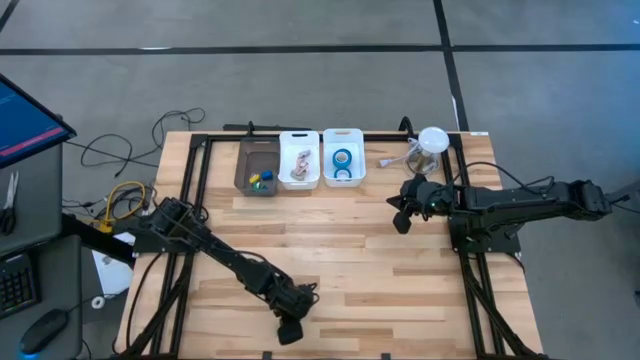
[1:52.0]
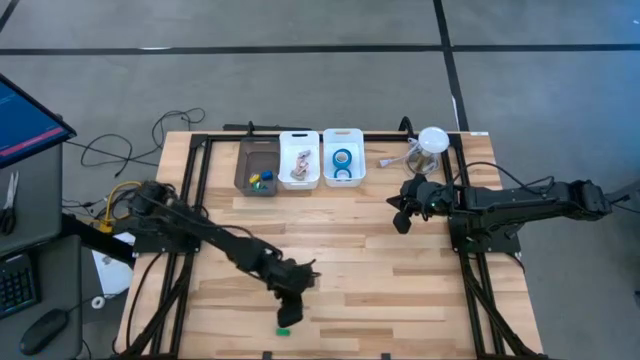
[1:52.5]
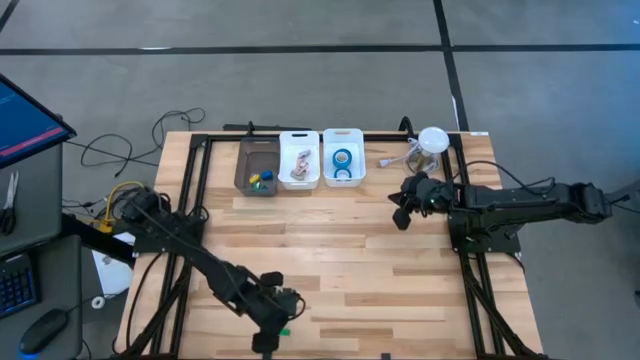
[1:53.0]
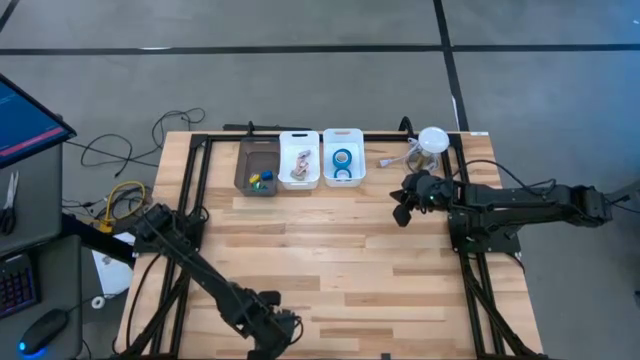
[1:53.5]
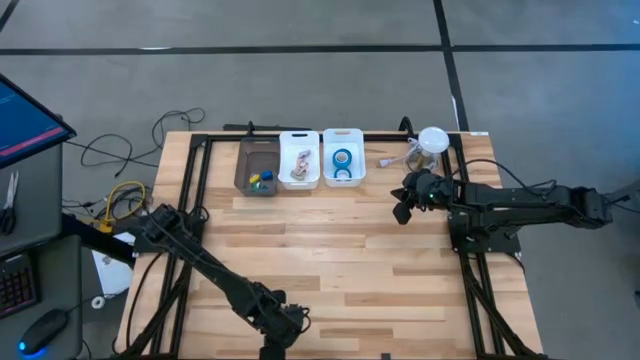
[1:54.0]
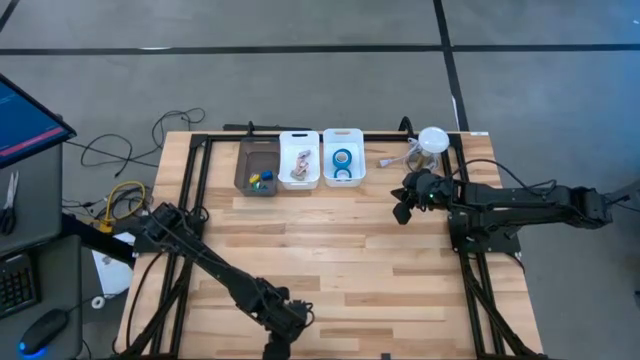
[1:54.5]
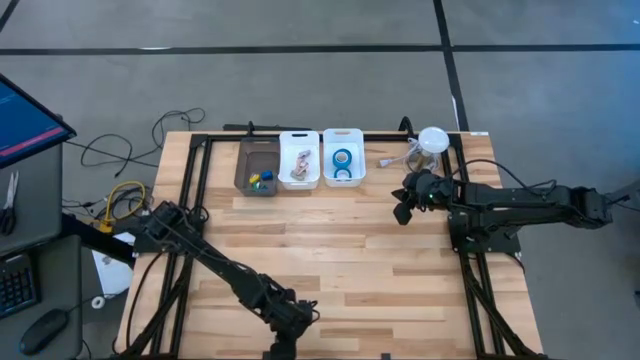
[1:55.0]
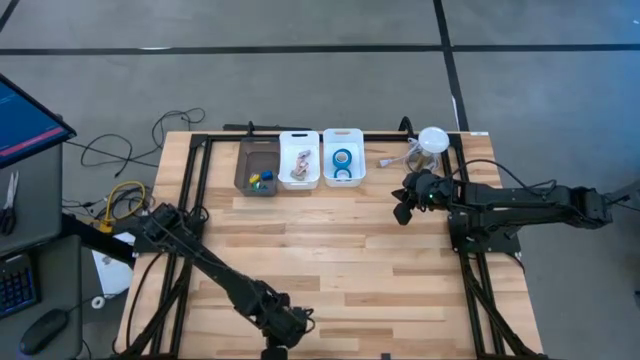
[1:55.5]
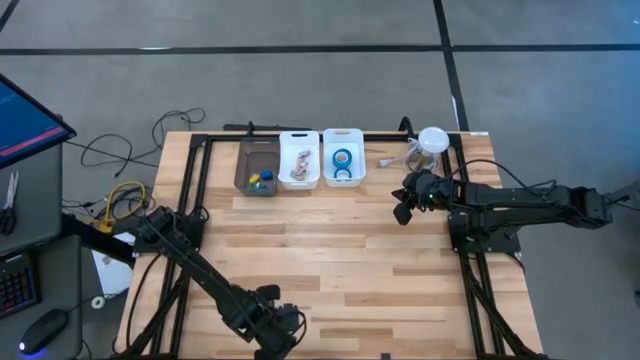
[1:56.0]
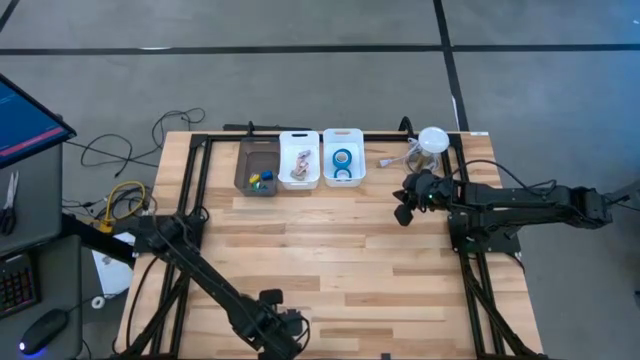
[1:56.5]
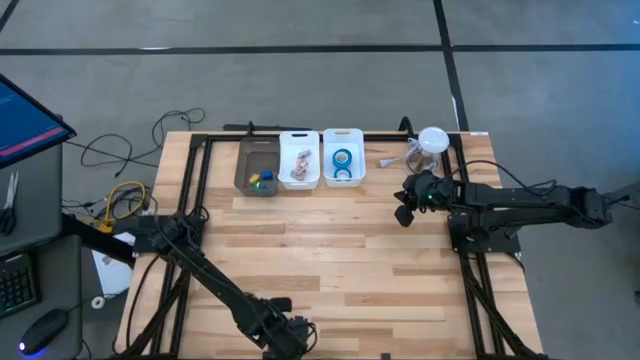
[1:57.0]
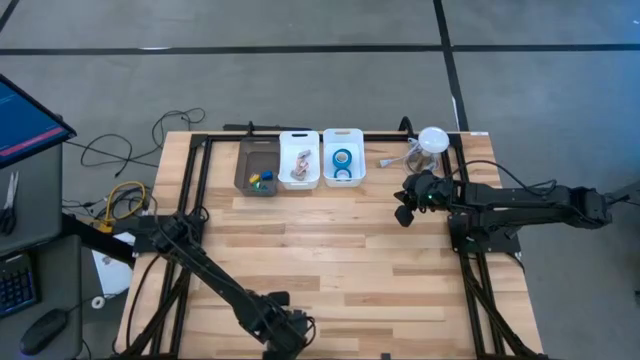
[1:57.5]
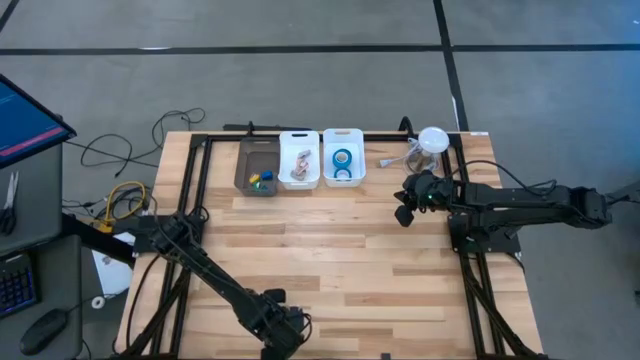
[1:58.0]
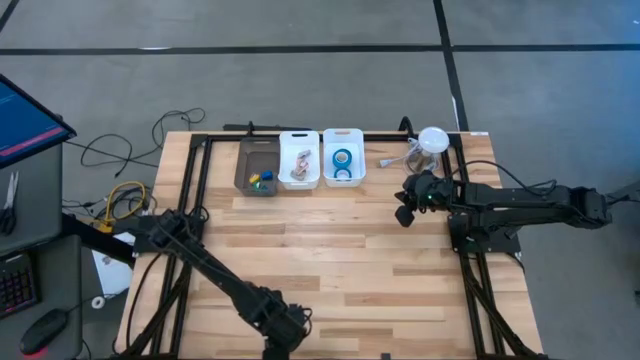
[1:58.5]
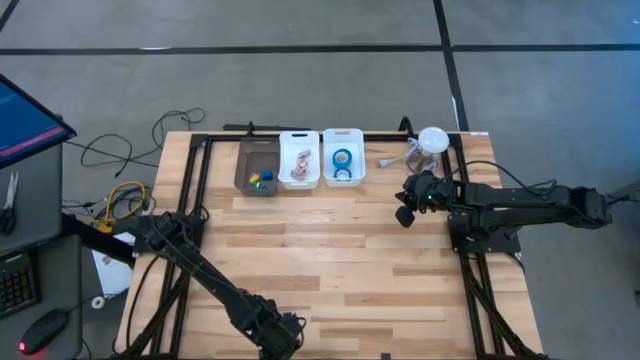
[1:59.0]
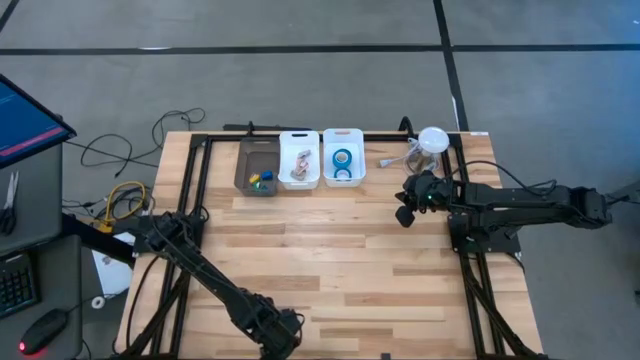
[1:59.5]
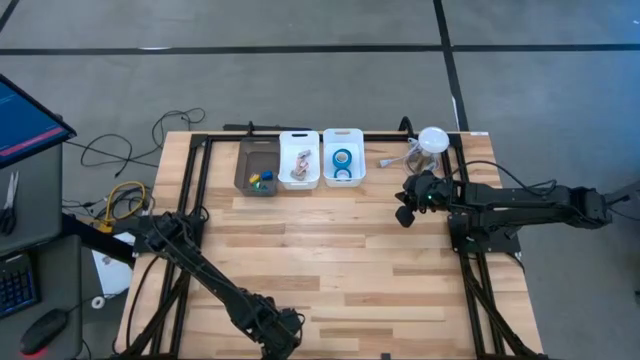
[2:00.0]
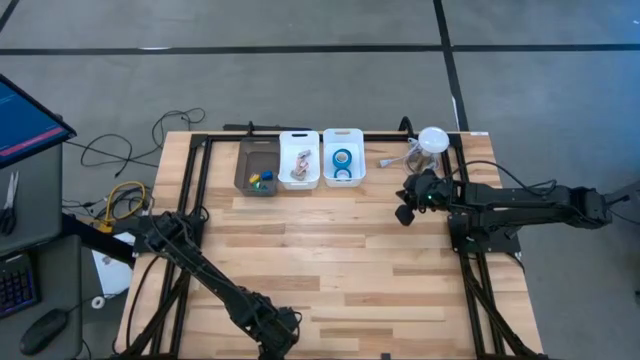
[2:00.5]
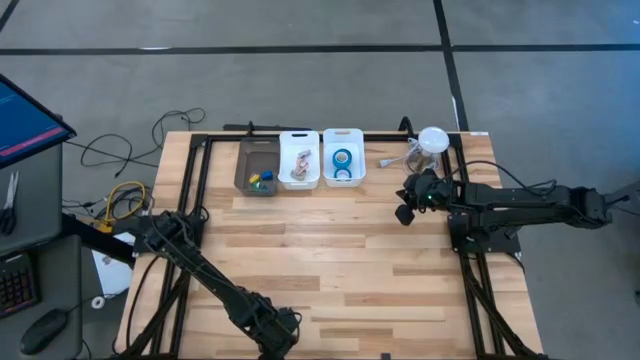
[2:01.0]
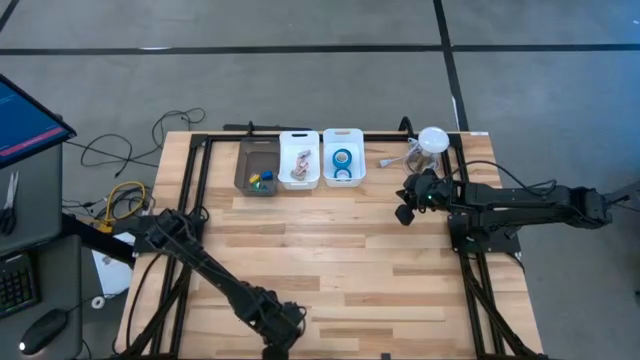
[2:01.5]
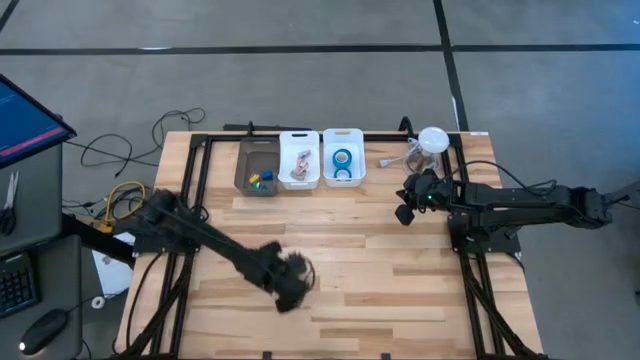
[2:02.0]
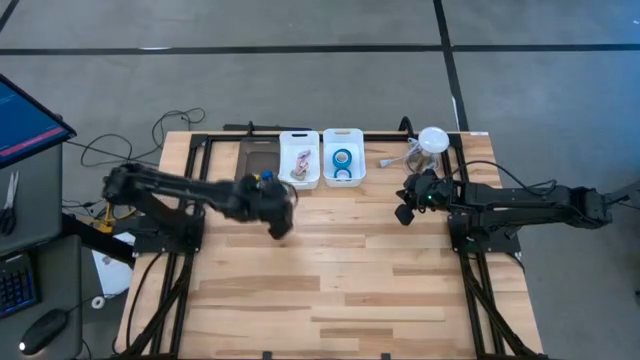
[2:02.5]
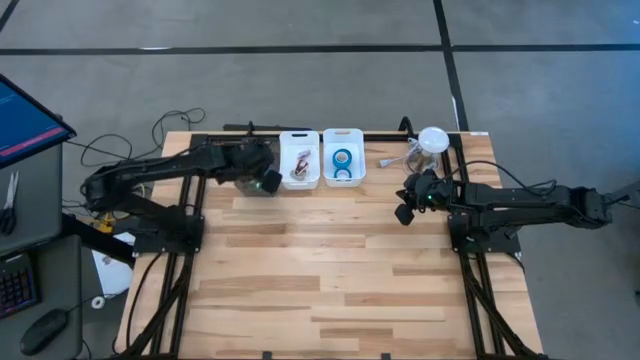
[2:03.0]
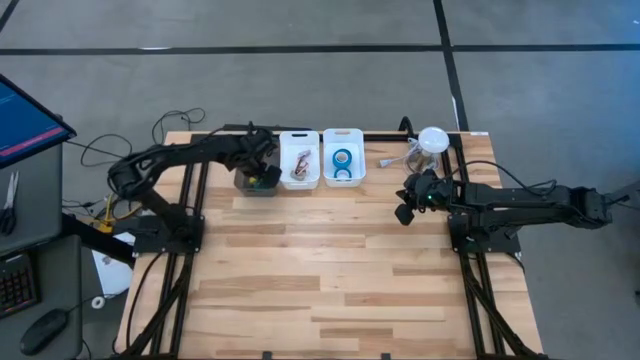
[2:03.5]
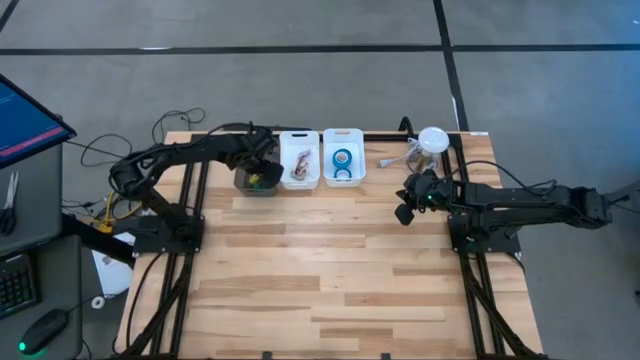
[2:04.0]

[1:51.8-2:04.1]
Task: Pick and place Stapler, Stapler remover, tape
Put the green stapler into the black bin

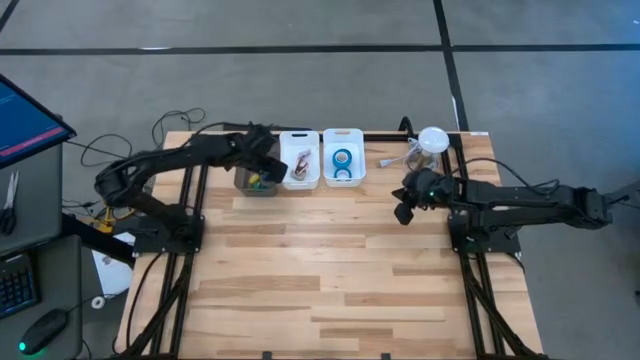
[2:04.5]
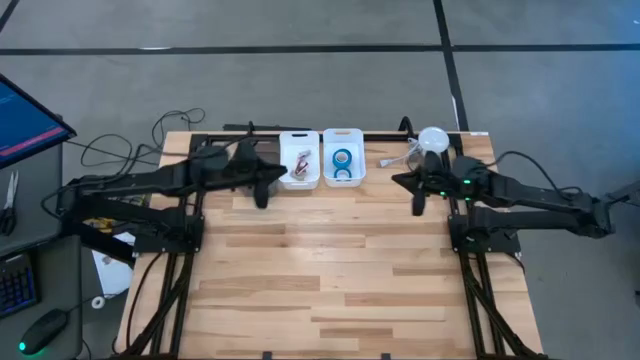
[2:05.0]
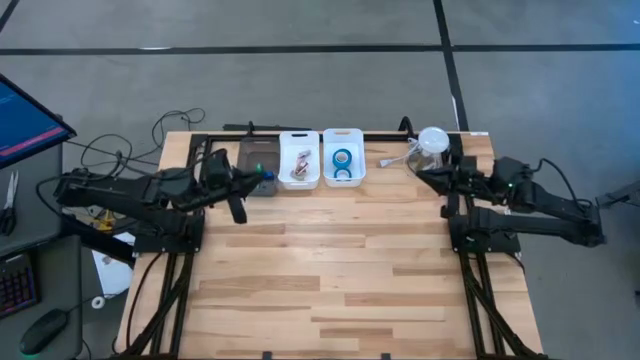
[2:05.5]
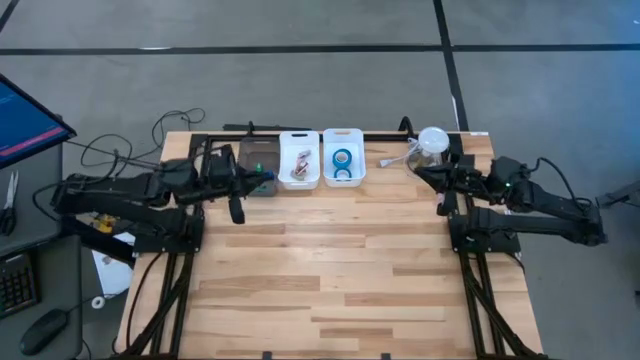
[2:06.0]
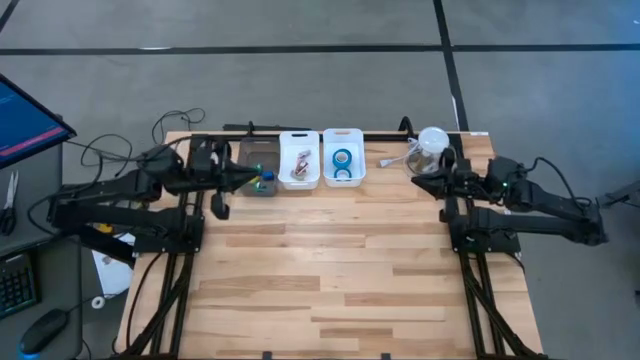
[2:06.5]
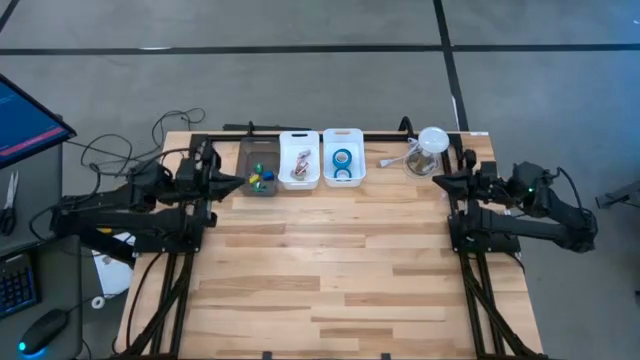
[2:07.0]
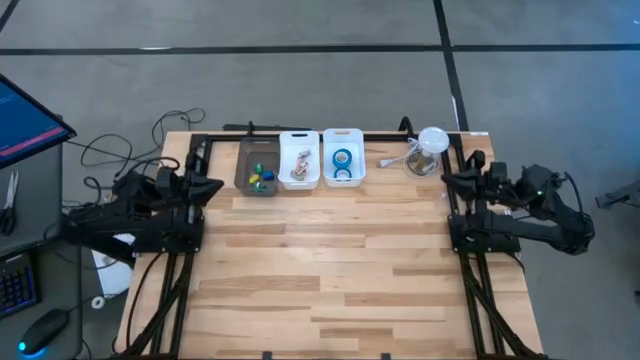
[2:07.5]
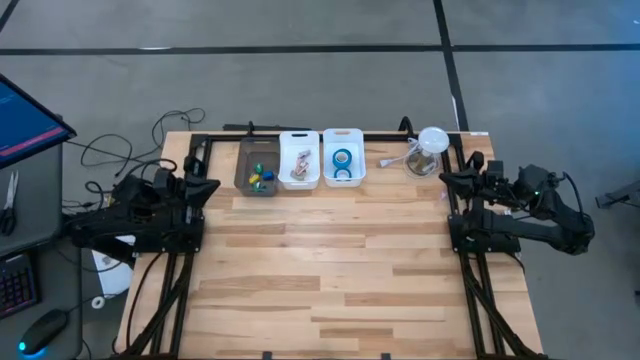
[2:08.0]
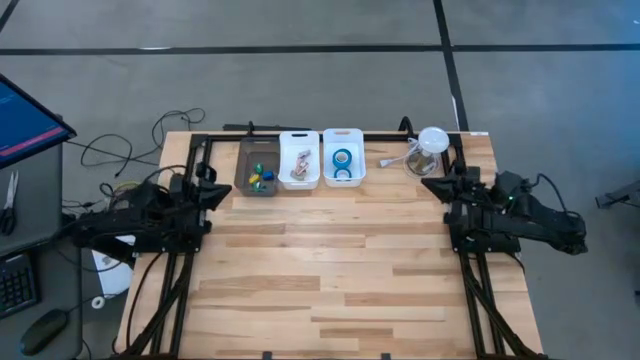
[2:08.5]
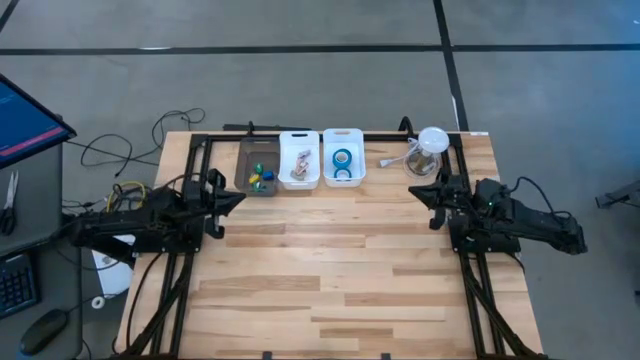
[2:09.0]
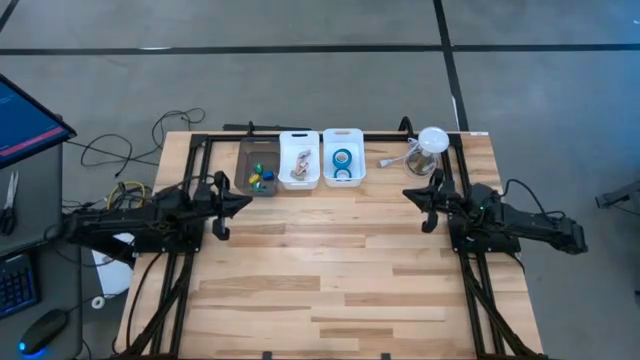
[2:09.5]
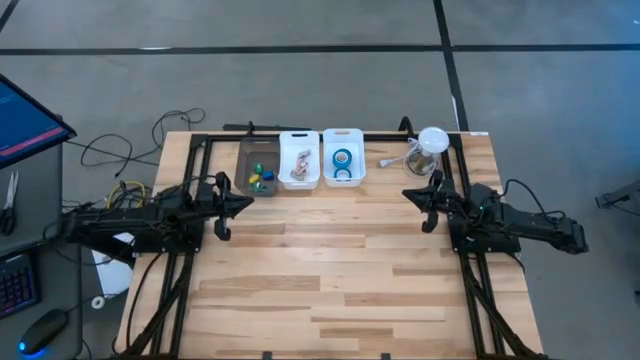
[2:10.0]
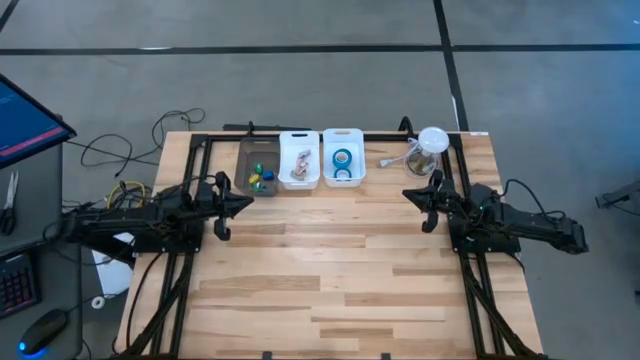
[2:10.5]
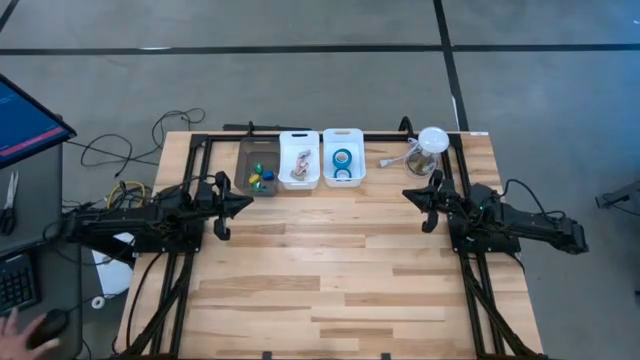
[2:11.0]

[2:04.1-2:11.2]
Return to Home Position

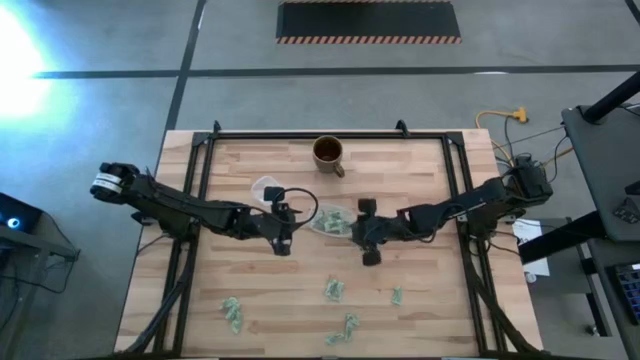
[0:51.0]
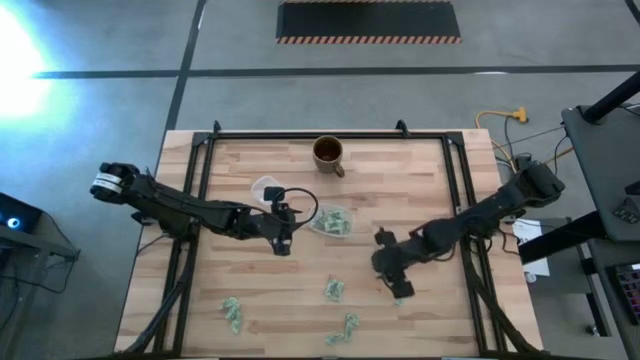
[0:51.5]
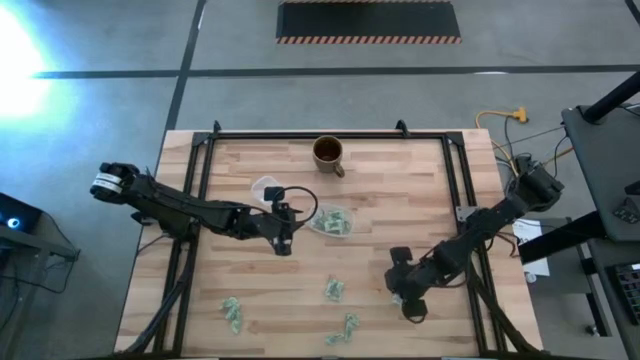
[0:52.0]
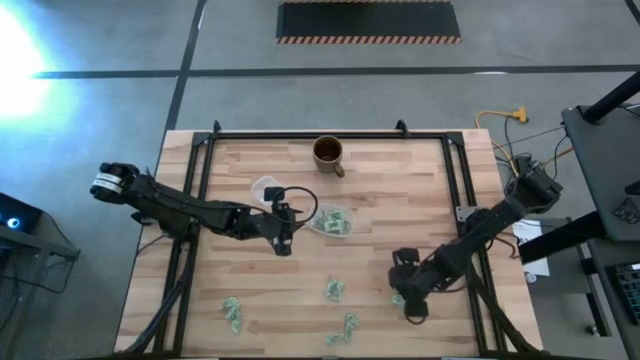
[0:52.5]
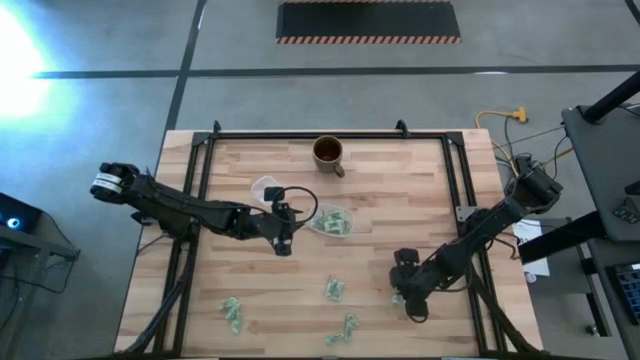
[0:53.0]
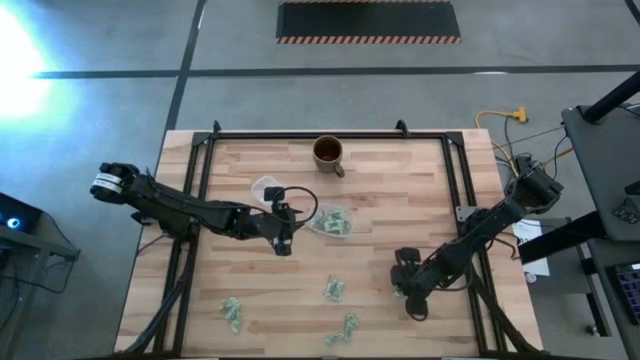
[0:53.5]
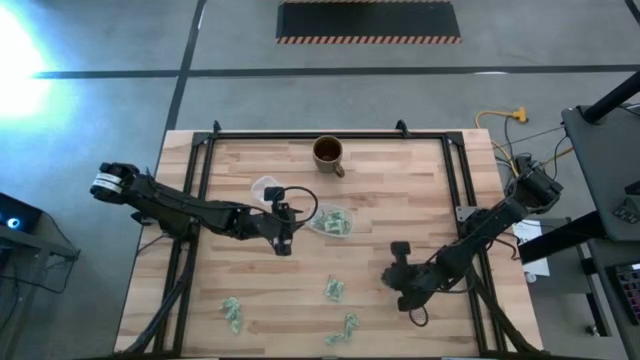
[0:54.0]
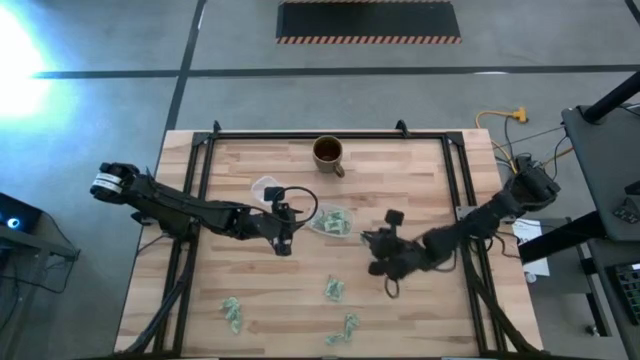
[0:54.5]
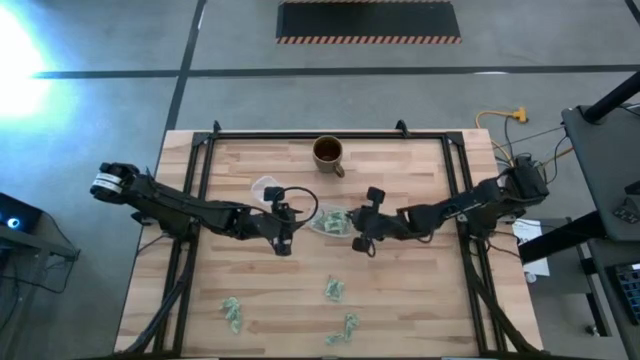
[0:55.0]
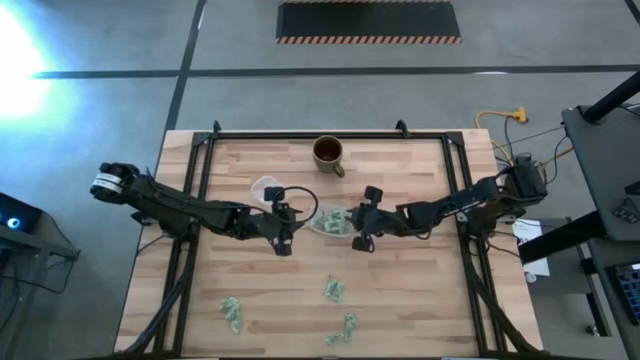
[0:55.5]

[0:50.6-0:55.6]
Task: Pick and place Stevia / Truvia into bins
Put the green stevia packet into the transparent container
